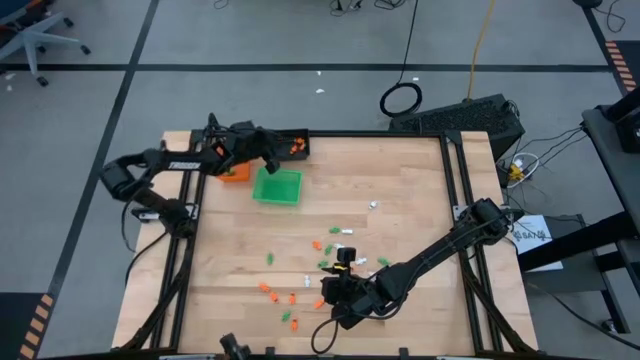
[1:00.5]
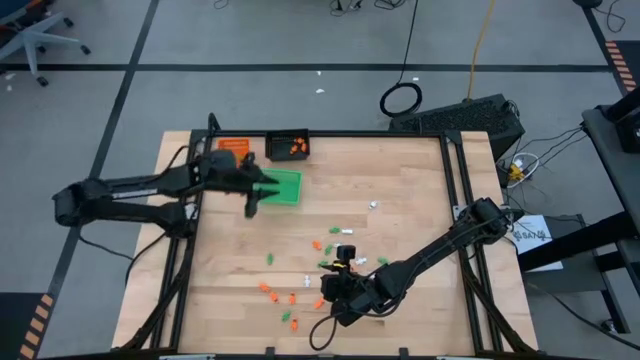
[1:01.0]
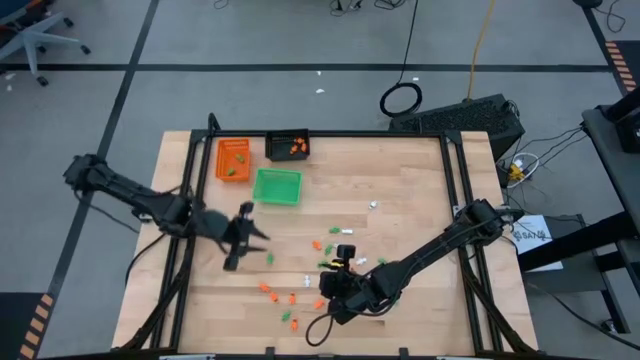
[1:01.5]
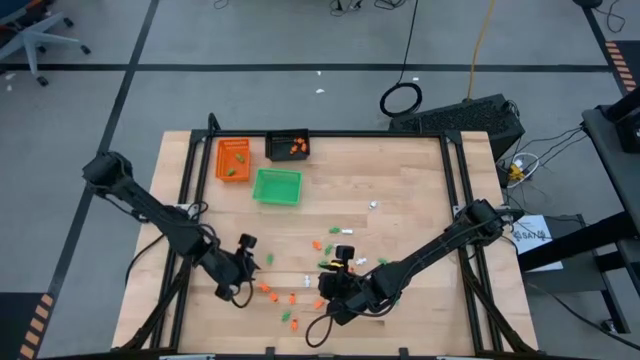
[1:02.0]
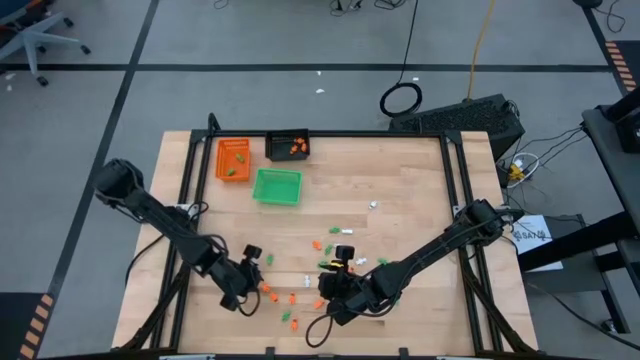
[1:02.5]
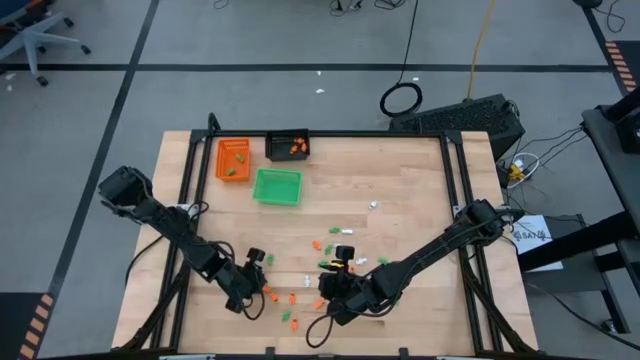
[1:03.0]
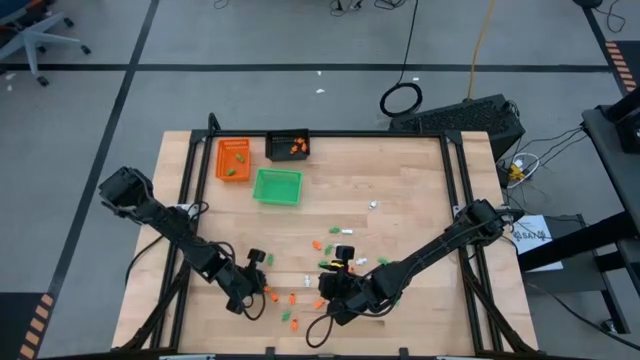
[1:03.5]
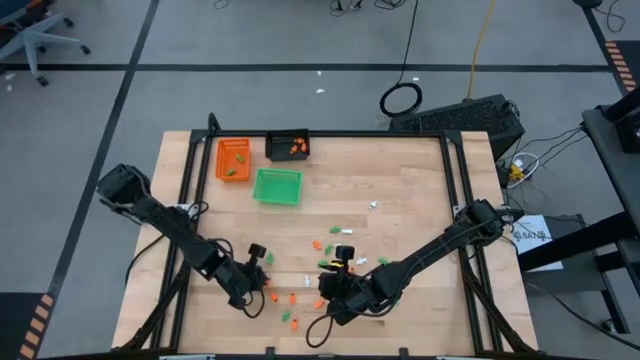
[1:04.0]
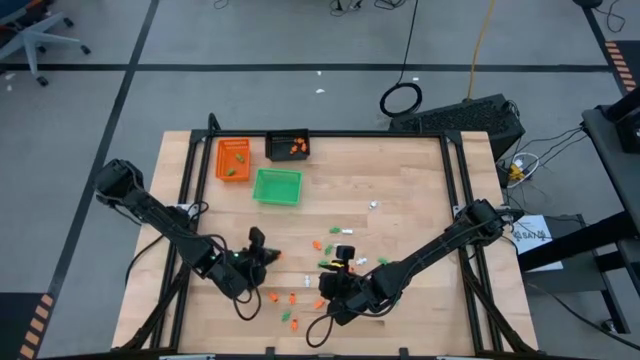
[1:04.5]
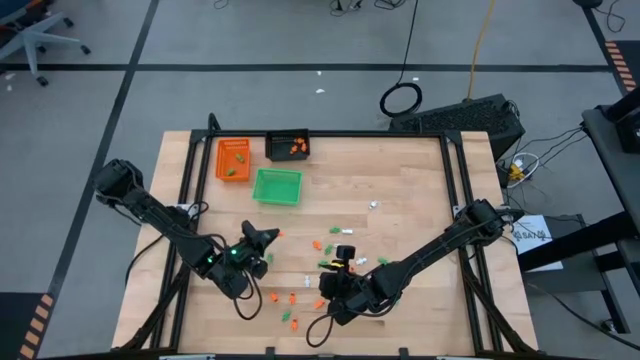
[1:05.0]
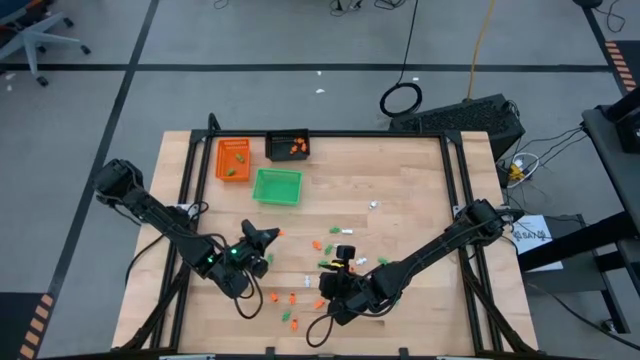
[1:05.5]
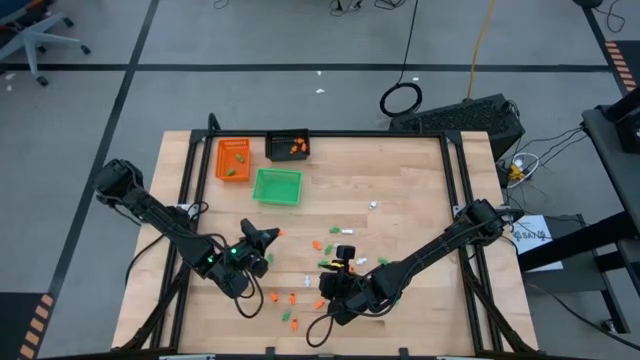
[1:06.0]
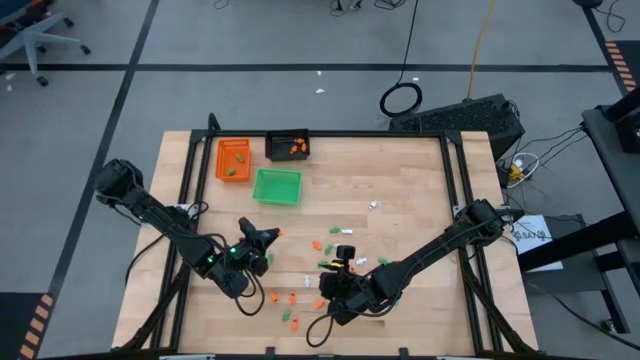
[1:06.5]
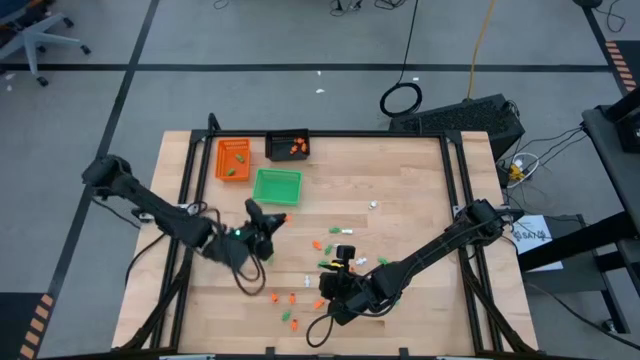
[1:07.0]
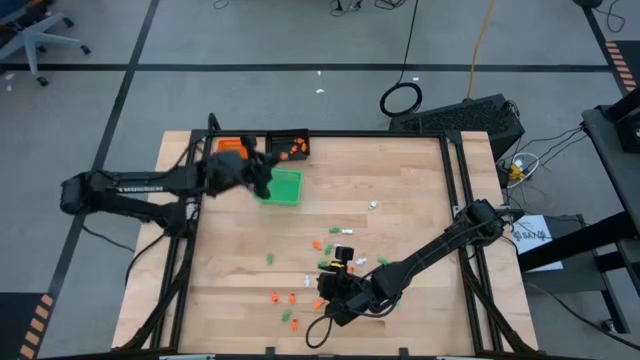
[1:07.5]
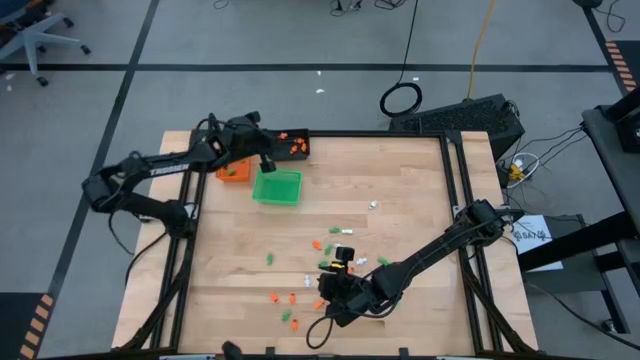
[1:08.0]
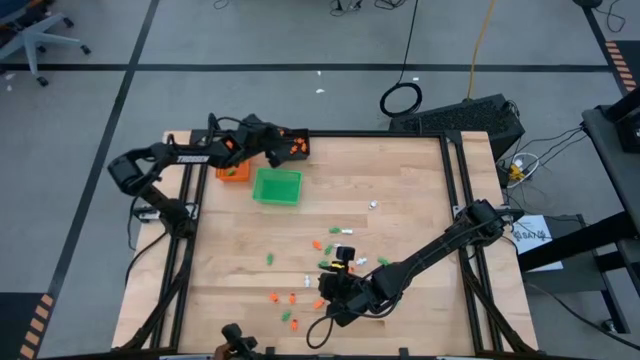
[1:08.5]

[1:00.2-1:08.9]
Task: Sort Halloween decoration
Put the orange skeleton toy into the black bin

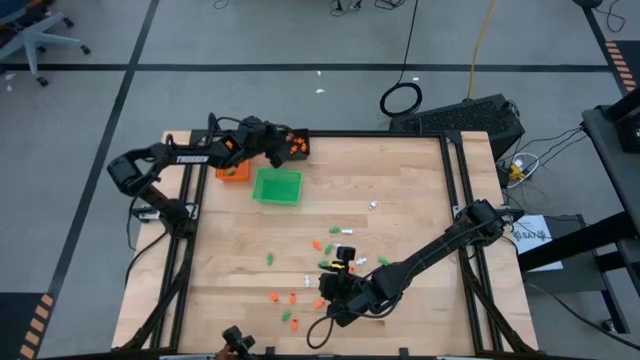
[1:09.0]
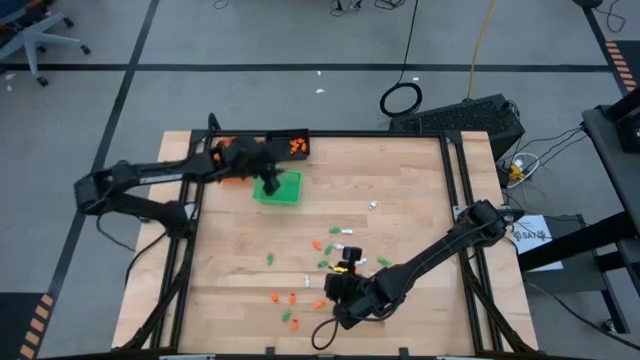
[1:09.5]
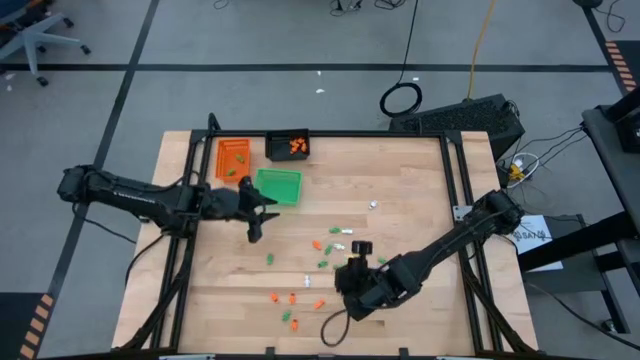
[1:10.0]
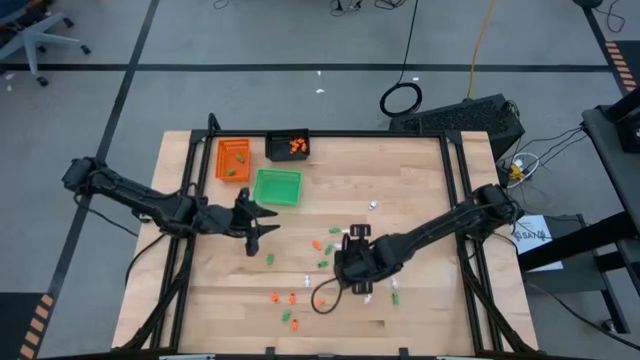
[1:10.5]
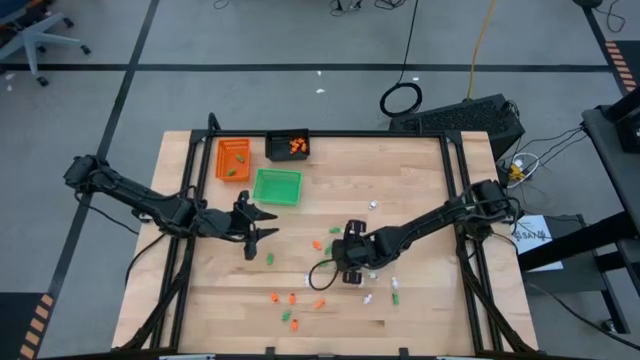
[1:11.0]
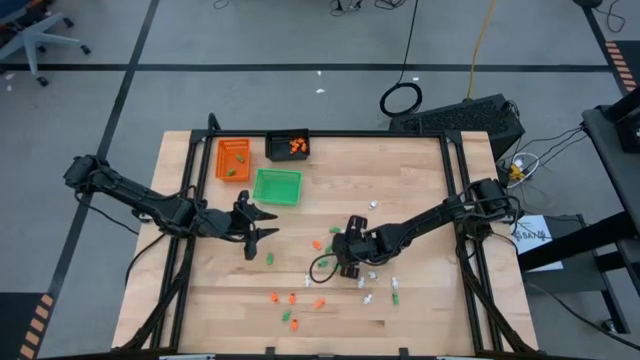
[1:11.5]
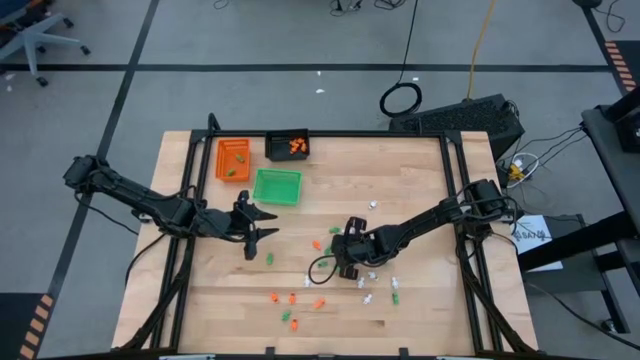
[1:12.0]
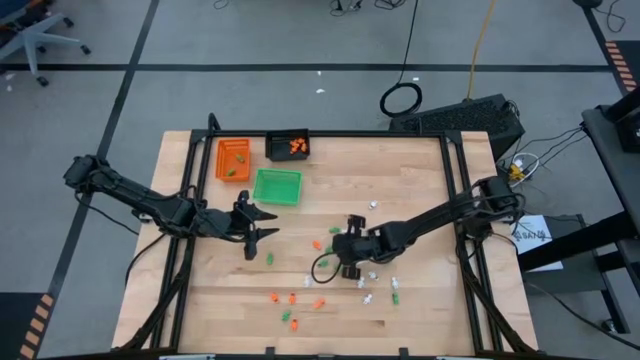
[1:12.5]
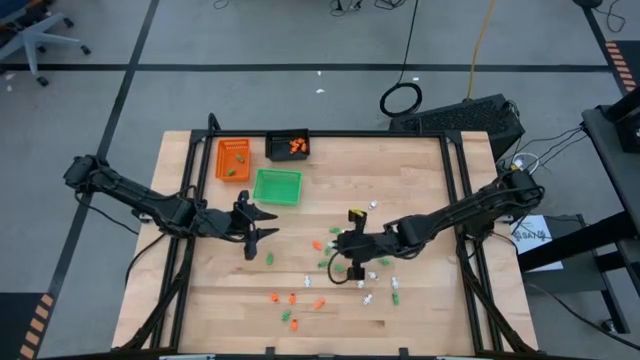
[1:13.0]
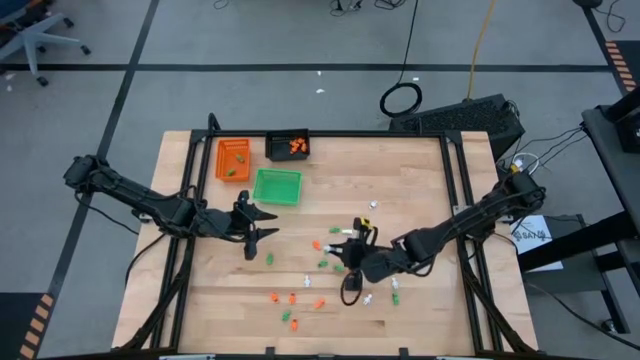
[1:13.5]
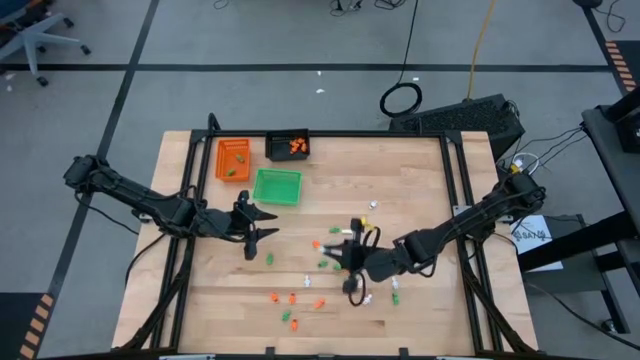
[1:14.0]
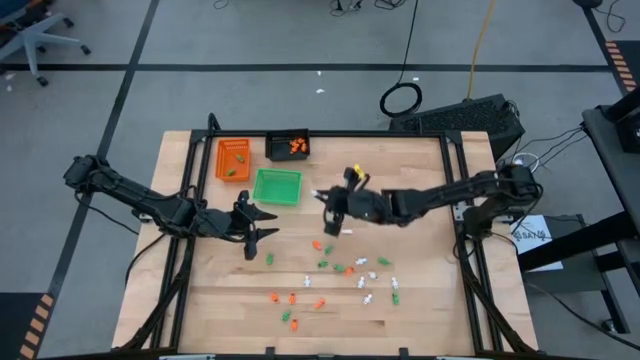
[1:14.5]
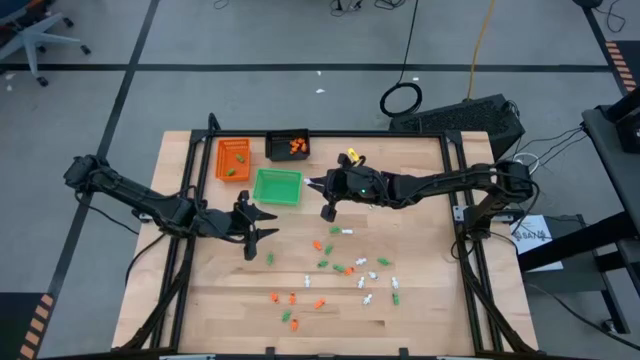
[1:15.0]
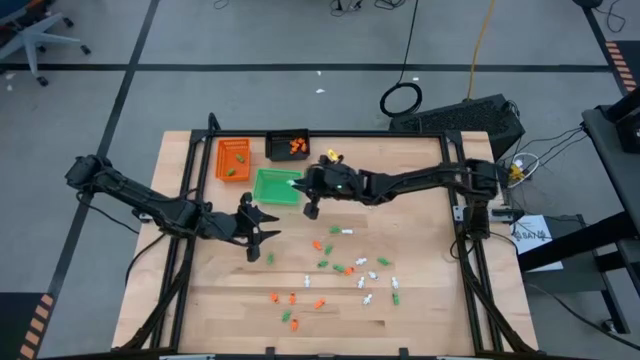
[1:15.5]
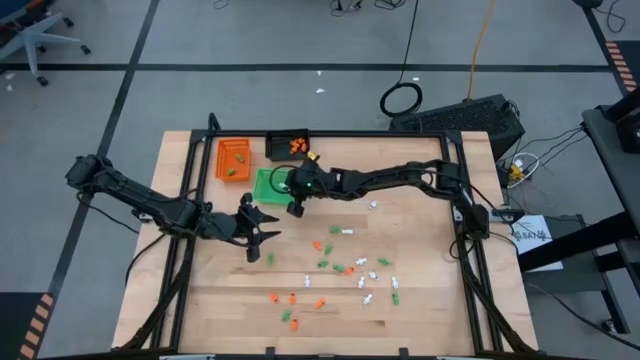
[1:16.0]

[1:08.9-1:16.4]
Put the white skeleton toy into the green bin

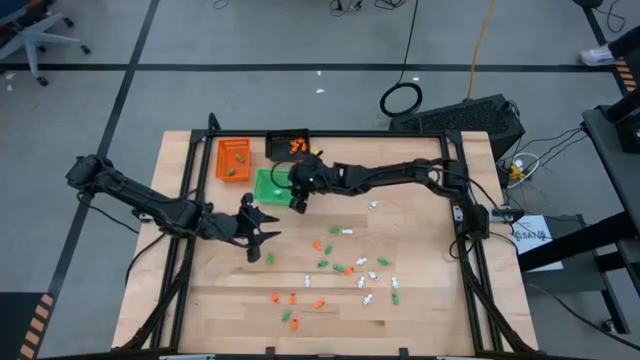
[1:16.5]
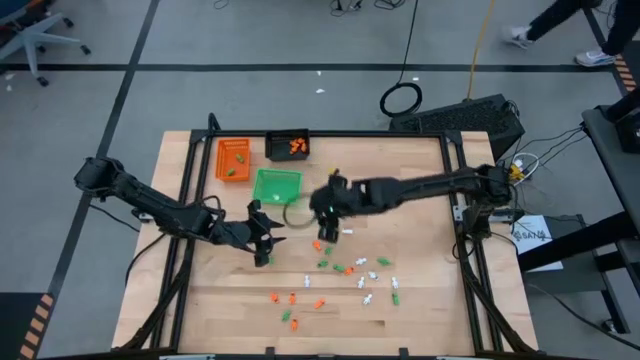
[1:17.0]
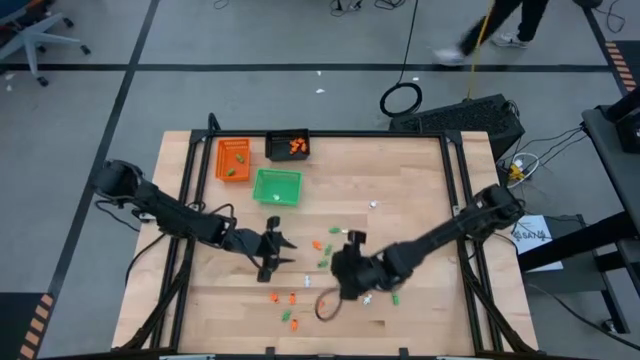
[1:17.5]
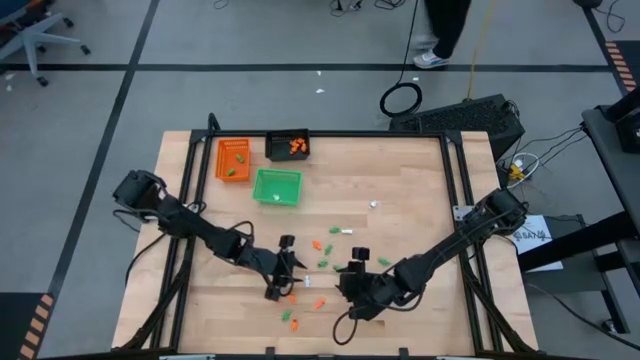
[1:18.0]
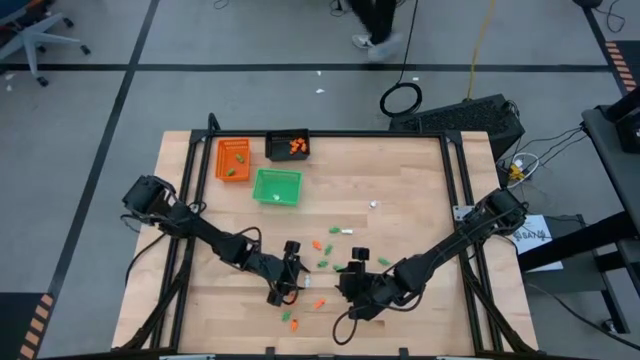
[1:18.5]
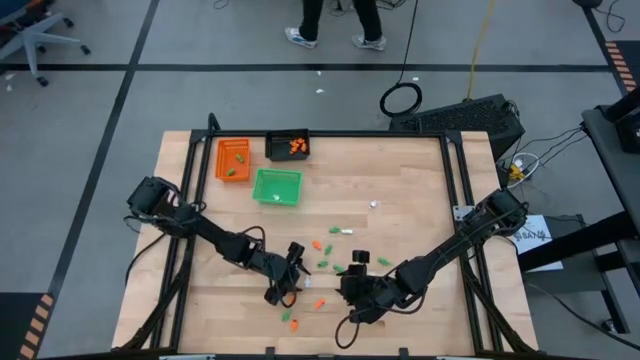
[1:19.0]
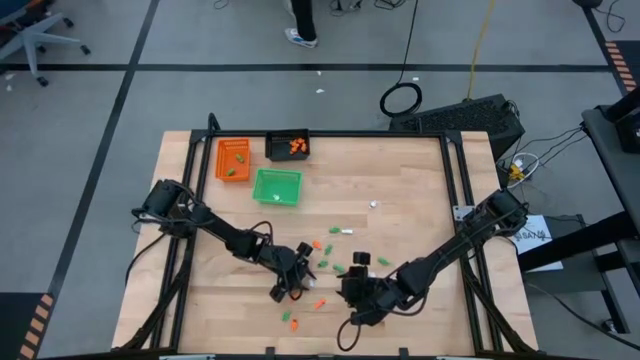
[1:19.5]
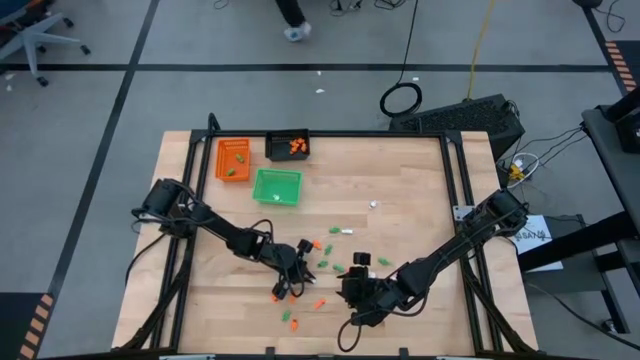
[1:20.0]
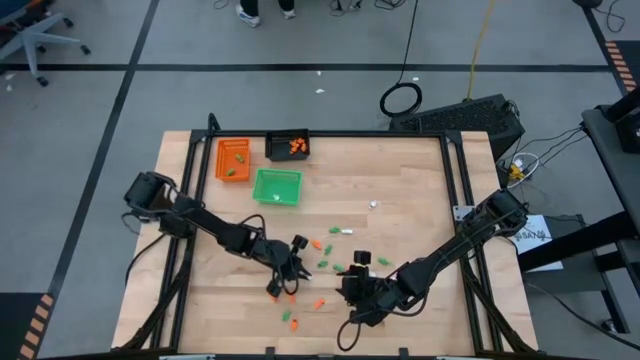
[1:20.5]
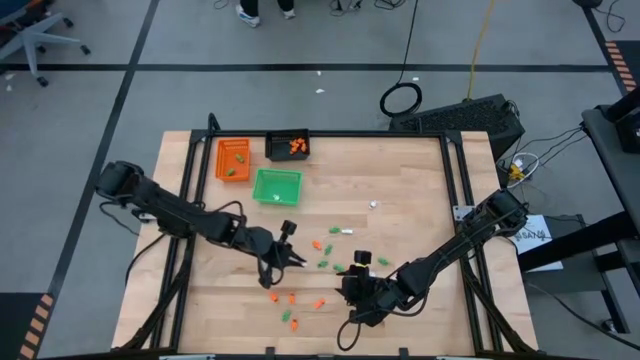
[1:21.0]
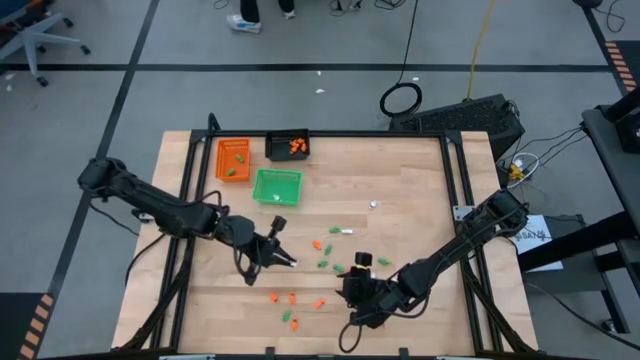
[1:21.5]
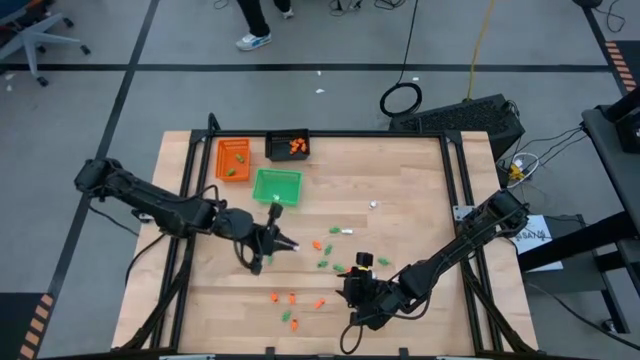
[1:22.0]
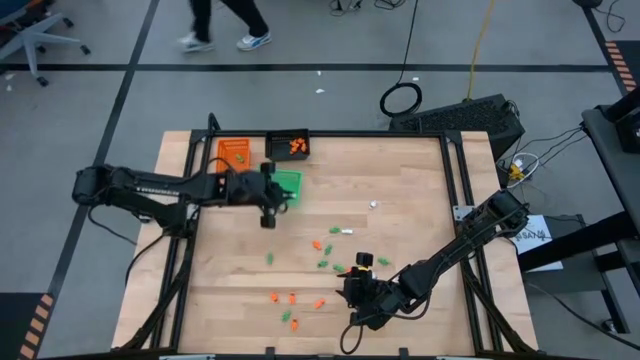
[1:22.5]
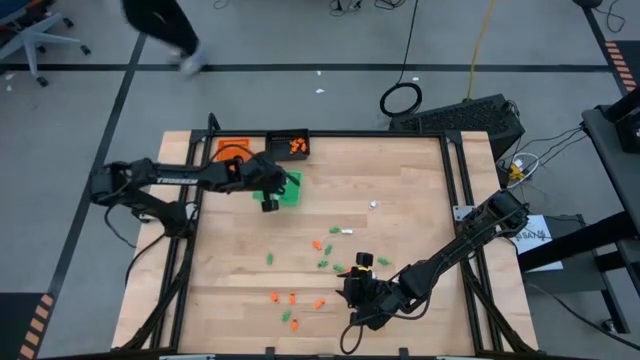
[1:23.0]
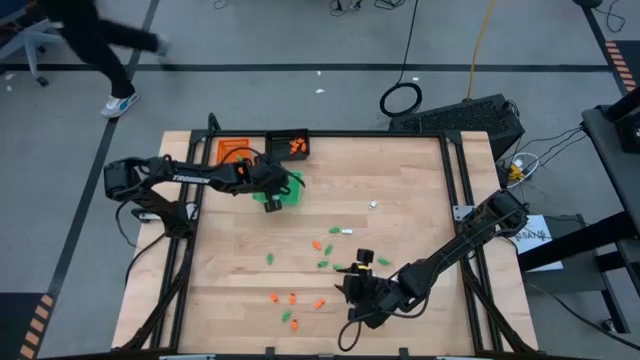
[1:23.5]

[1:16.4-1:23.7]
Put the white skeleton toy into the green bin
